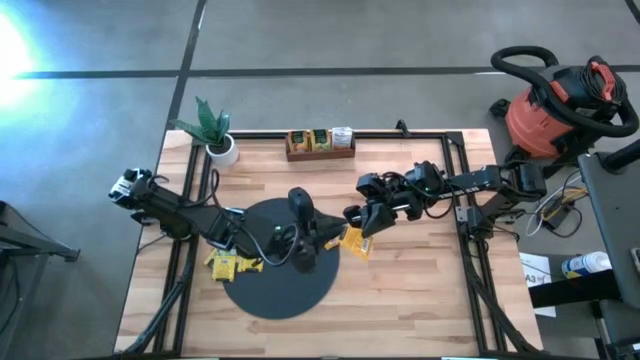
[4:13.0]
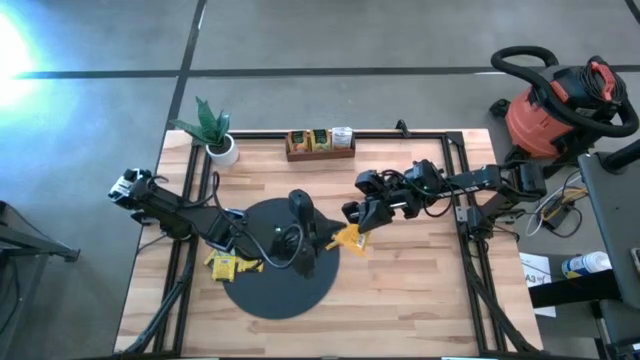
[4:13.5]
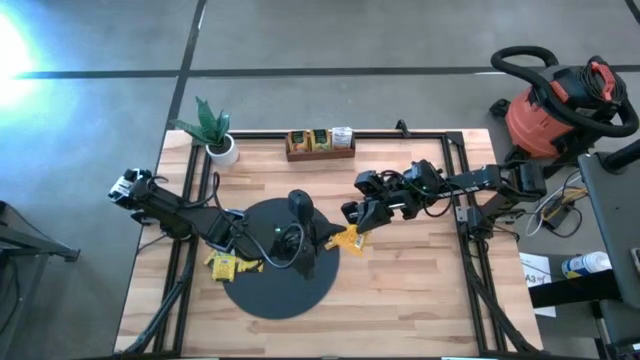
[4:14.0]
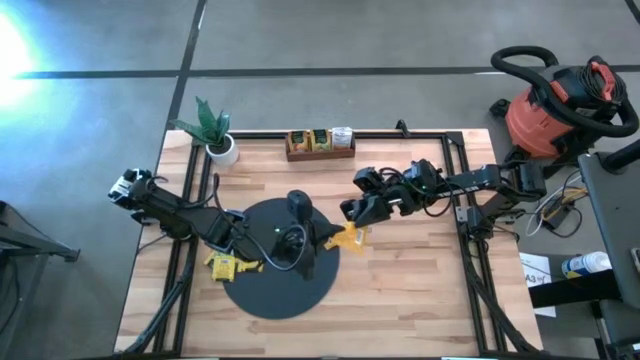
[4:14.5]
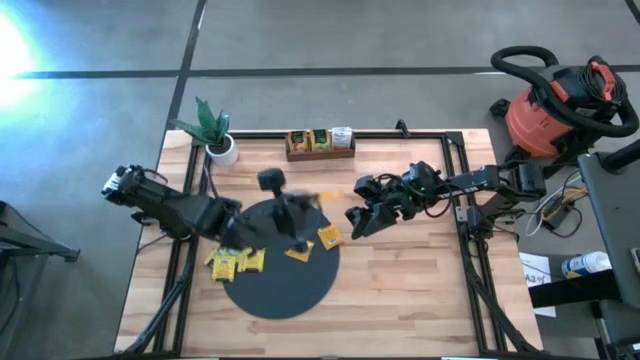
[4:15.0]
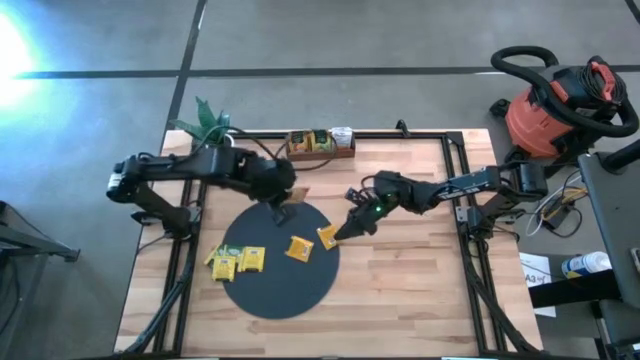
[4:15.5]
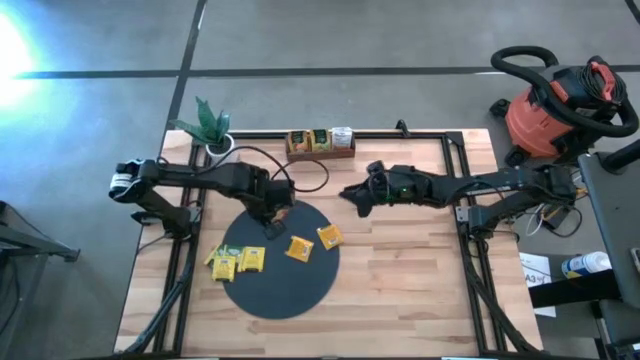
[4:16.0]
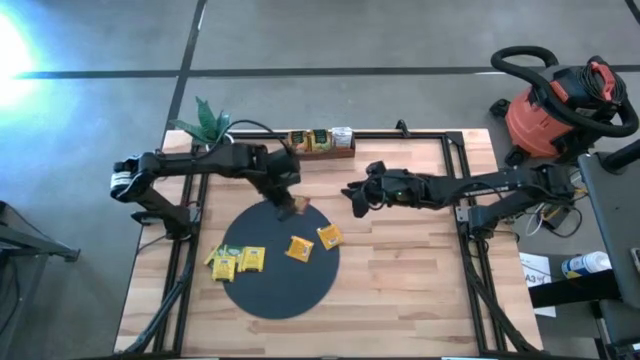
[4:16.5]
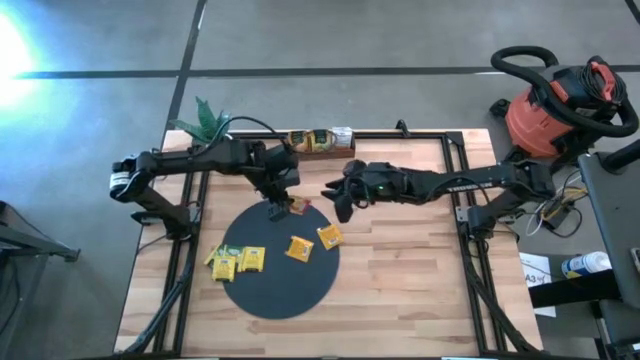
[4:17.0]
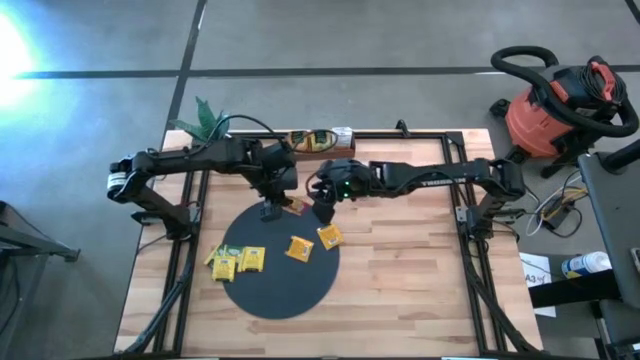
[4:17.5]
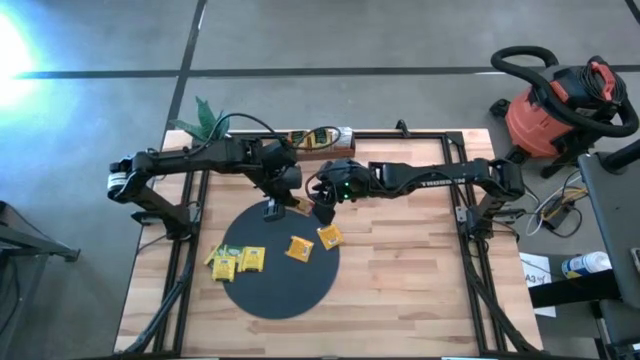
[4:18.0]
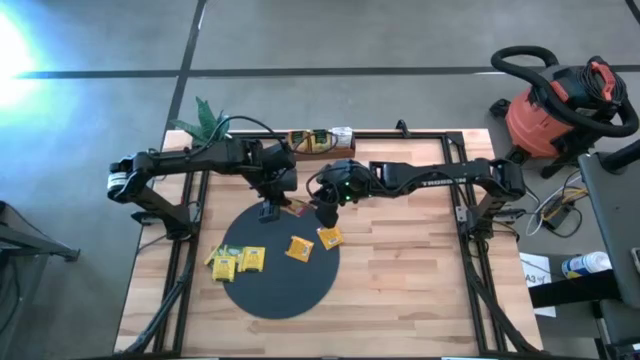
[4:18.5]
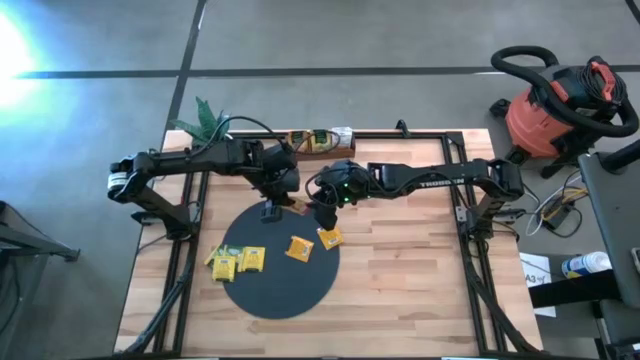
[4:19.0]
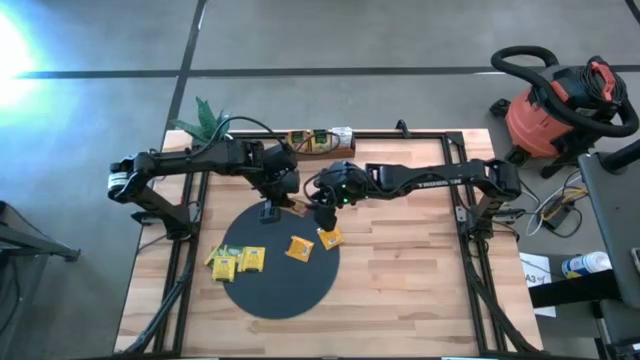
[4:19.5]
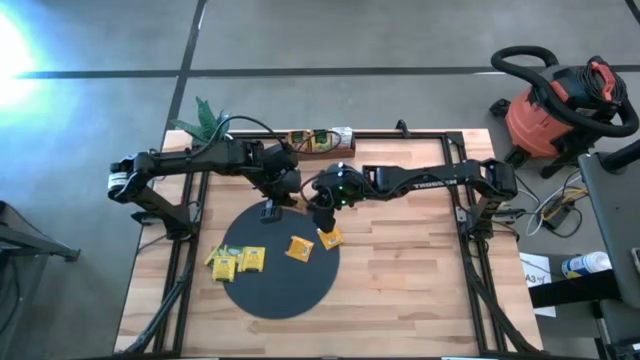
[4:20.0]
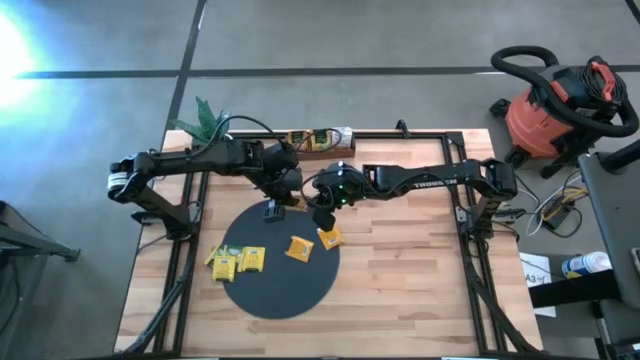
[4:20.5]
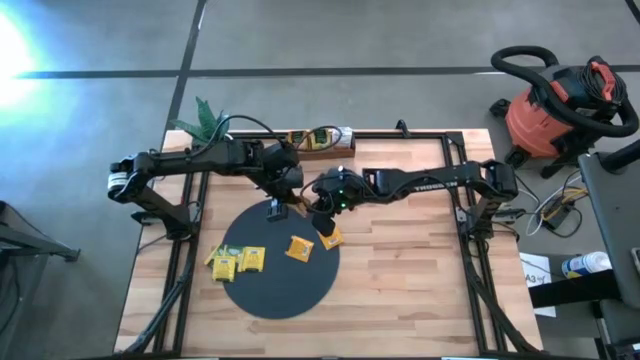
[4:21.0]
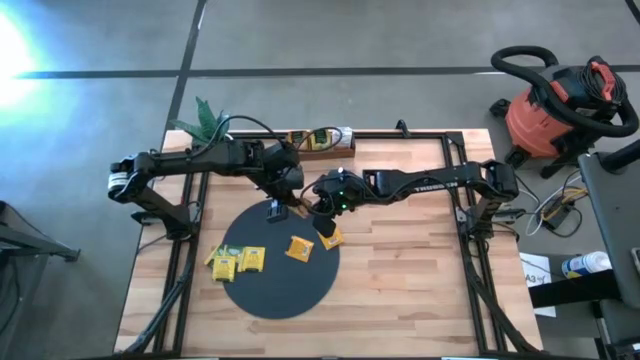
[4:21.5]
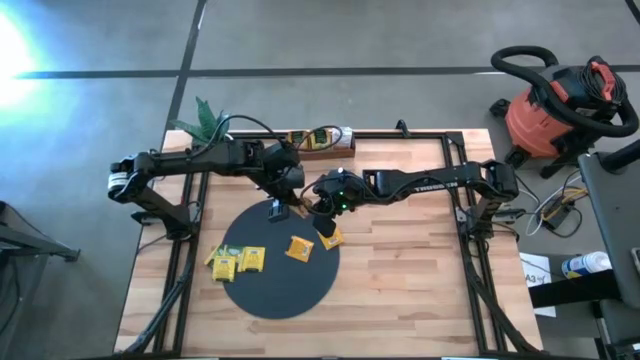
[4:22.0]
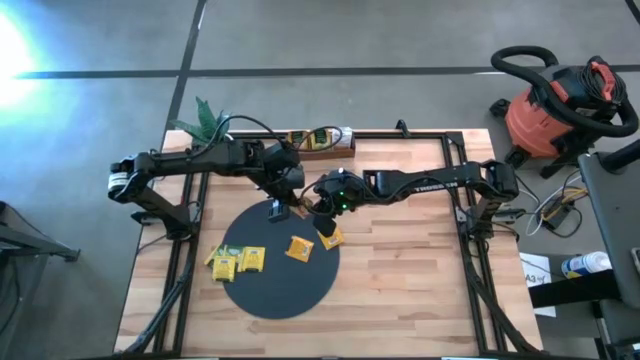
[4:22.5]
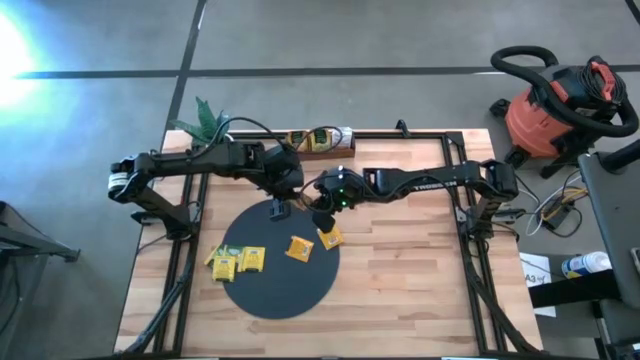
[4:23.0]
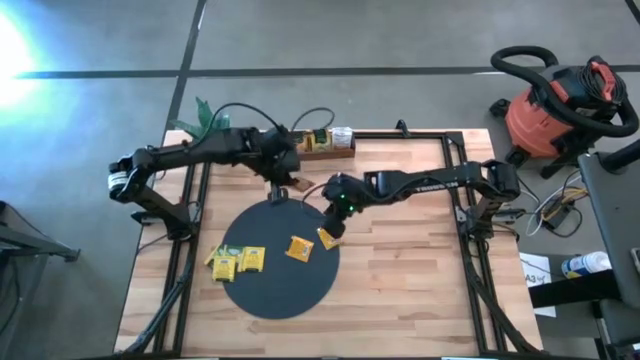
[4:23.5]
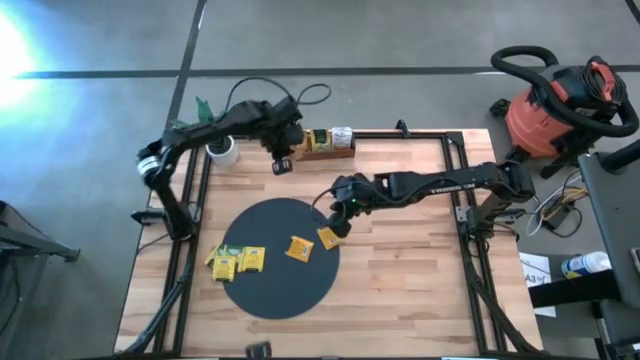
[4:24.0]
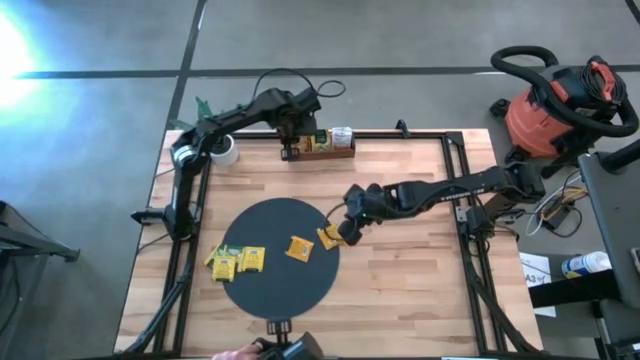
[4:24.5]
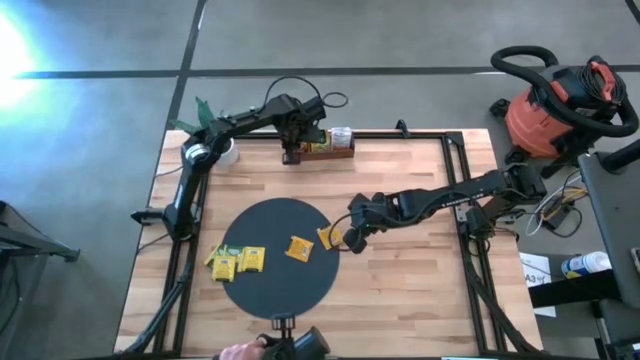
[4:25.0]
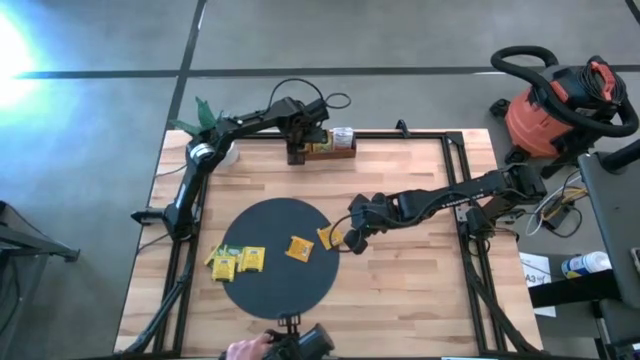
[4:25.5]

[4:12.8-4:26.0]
Task: Pick & Place Tea
Put the orange tea bag into the left section of the wooden organizer

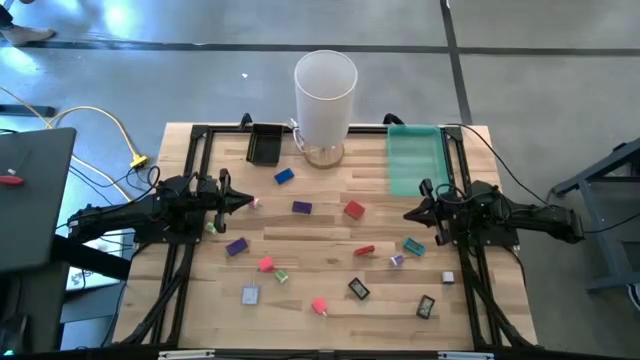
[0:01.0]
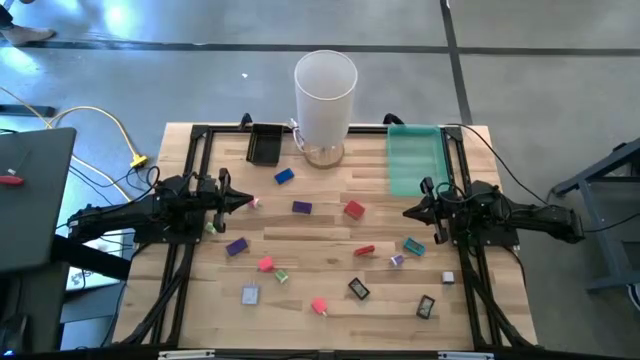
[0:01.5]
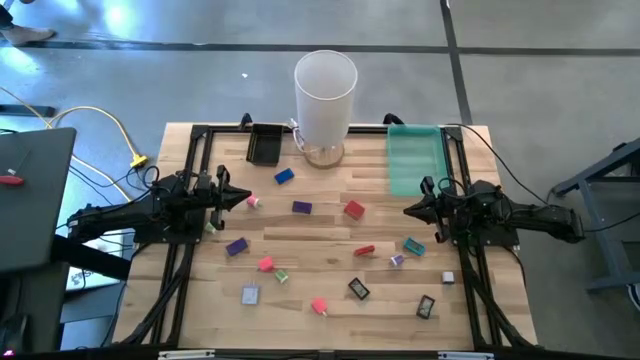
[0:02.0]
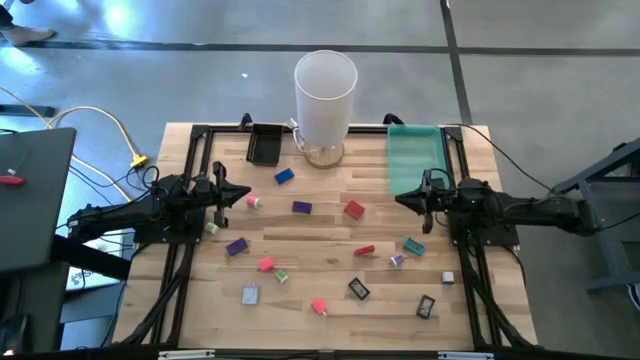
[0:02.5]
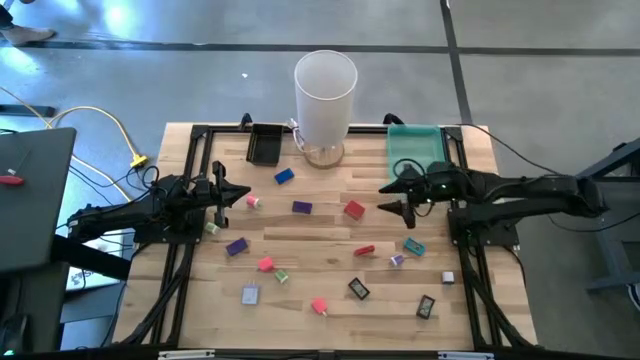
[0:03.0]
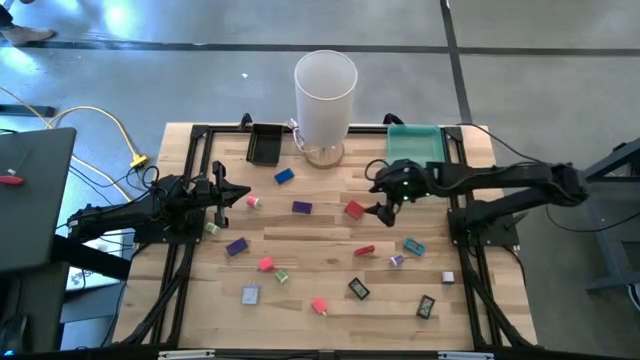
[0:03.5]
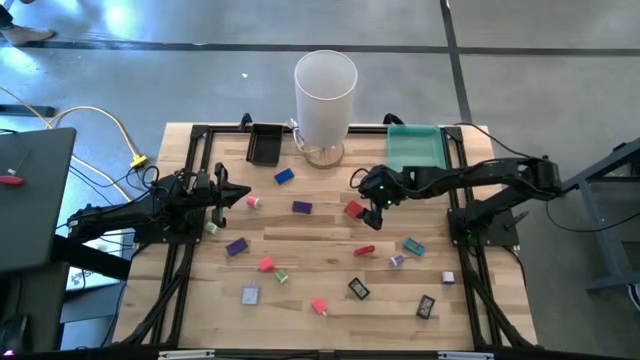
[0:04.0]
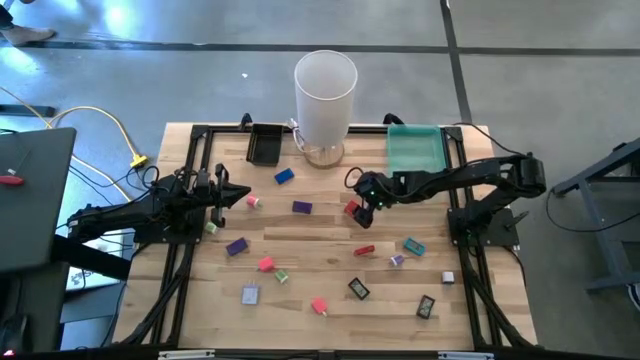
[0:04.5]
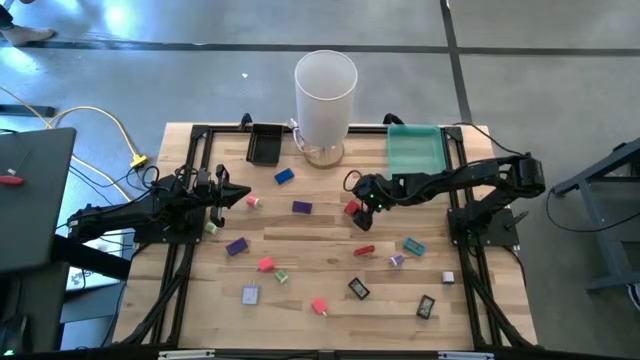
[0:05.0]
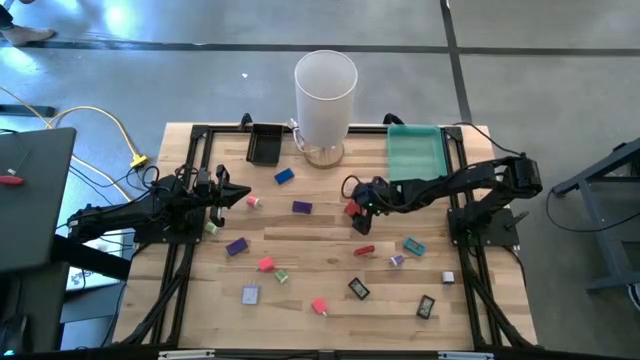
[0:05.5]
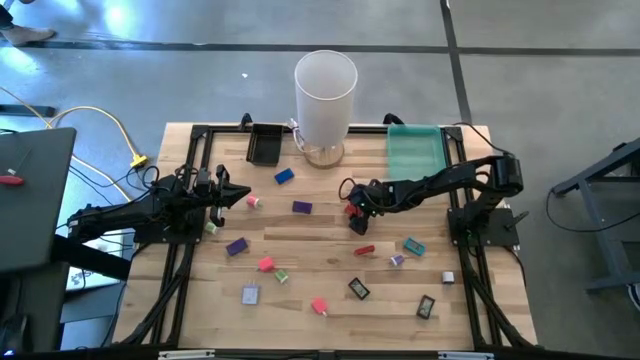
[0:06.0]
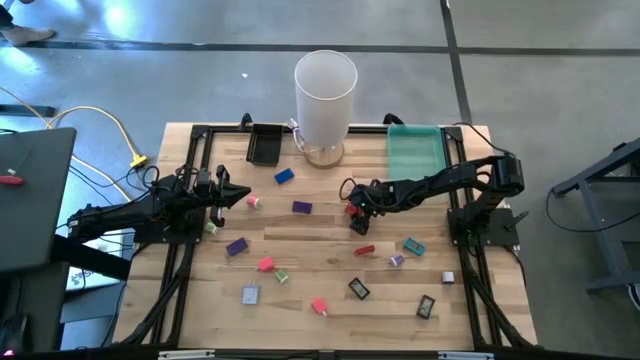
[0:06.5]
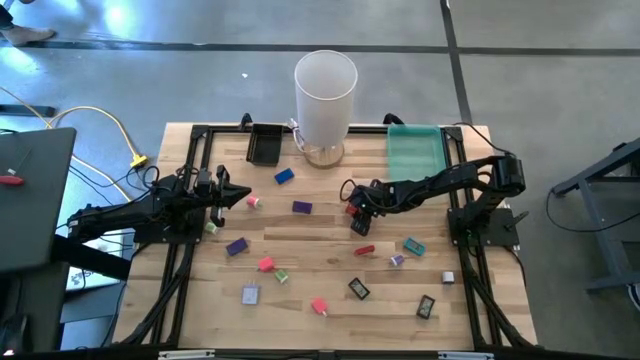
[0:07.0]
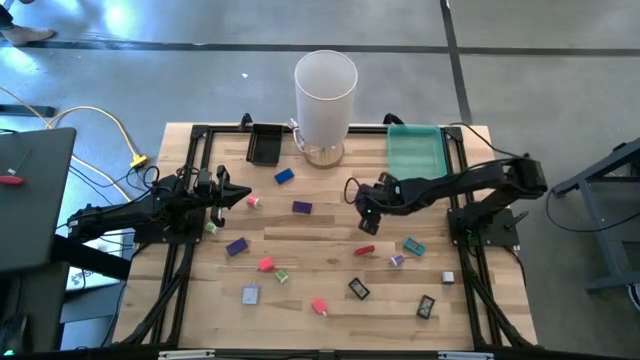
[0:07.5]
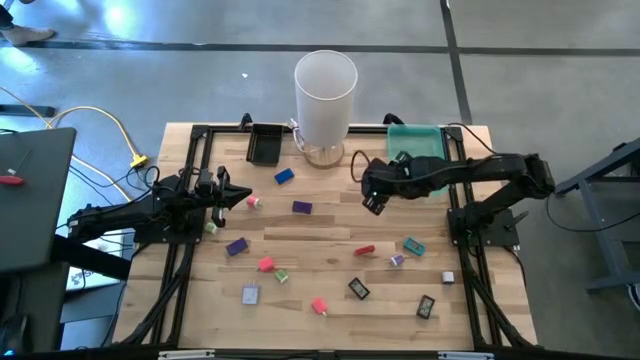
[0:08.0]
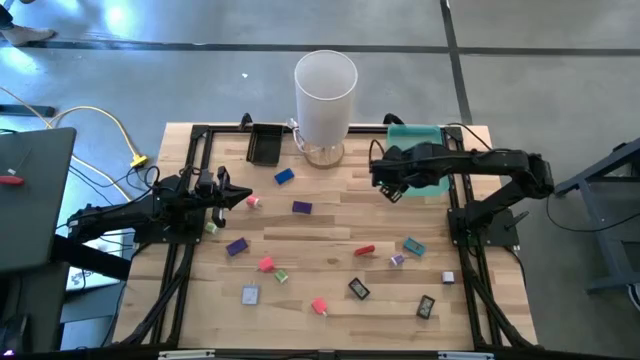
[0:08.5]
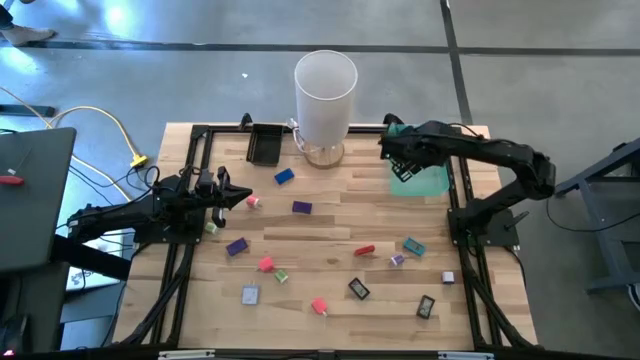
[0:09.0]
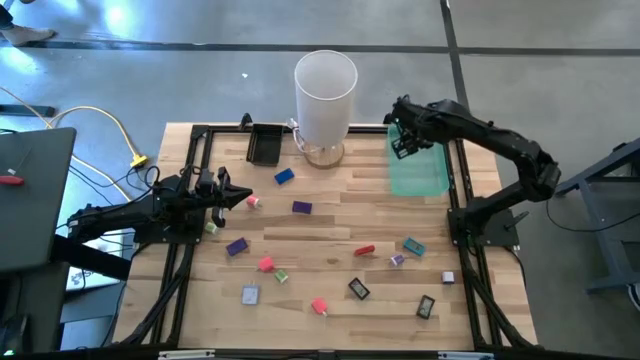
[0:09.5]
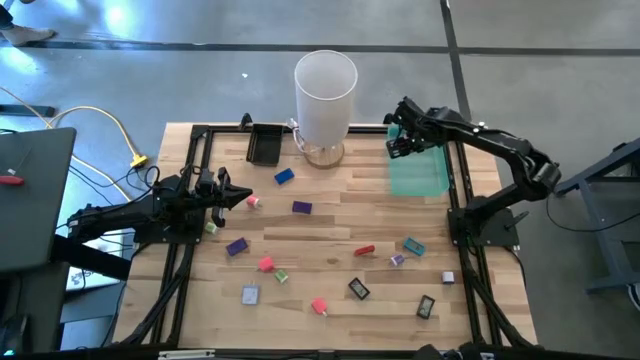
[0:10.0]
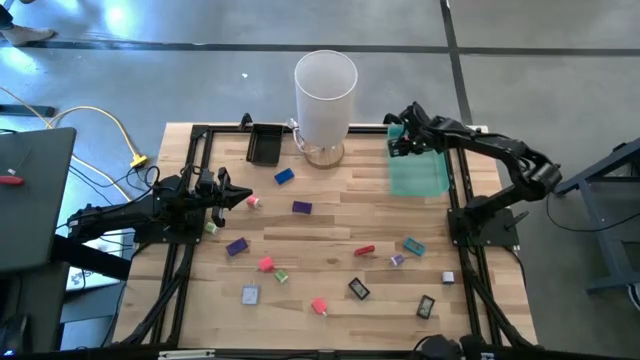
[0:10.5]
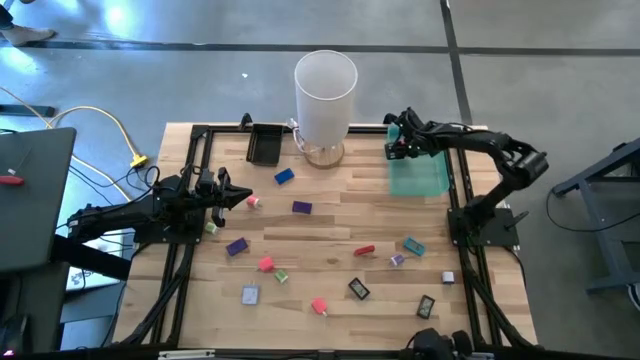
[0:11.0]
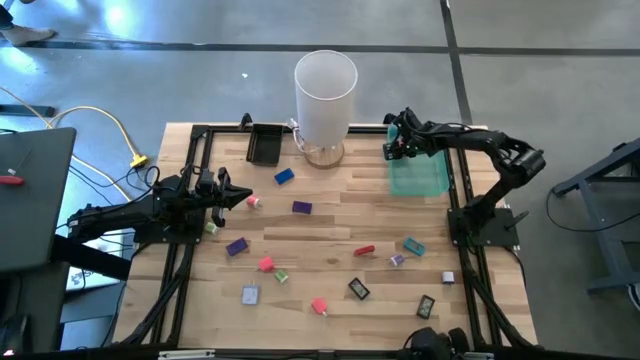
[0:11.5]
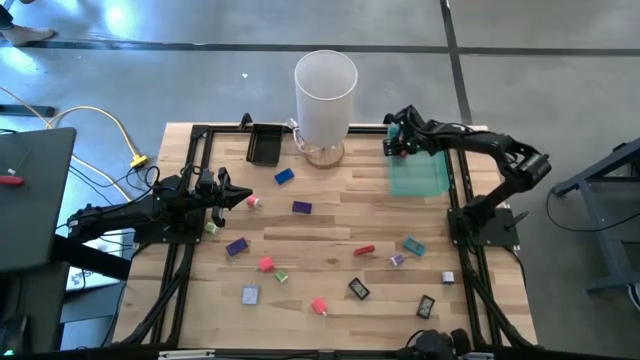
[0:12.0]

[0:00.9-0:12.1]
Task: Pick & Place Office items
Put the red adapter into the green bin
